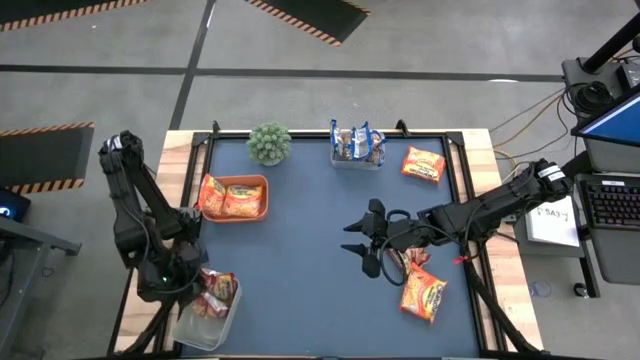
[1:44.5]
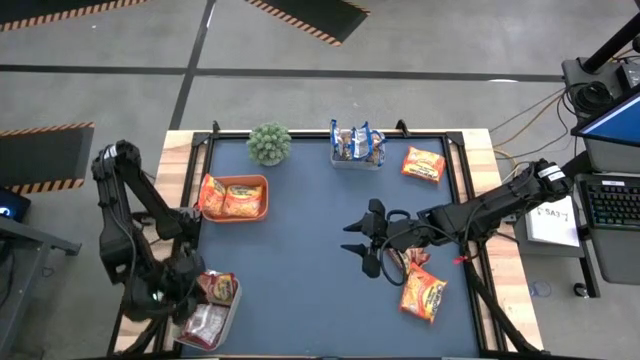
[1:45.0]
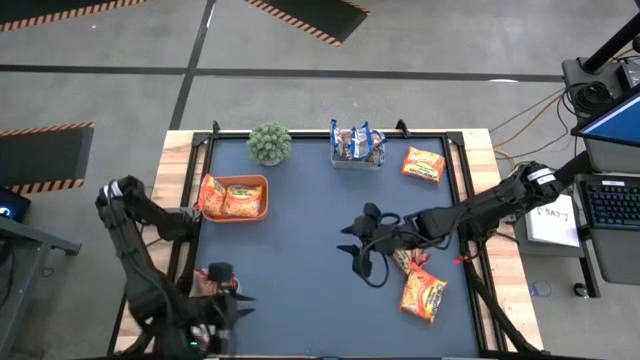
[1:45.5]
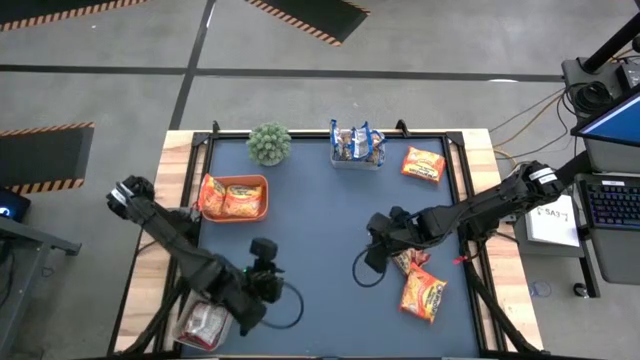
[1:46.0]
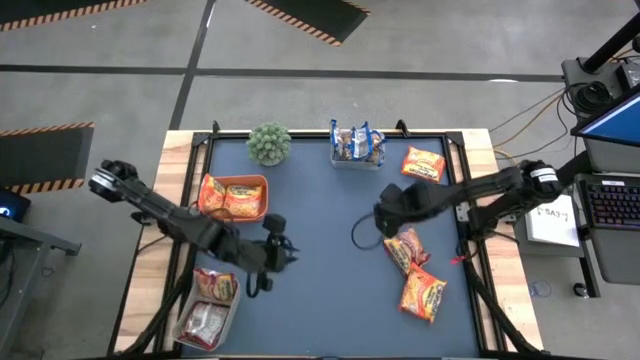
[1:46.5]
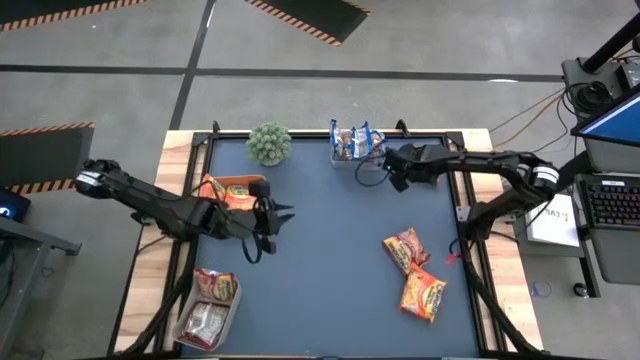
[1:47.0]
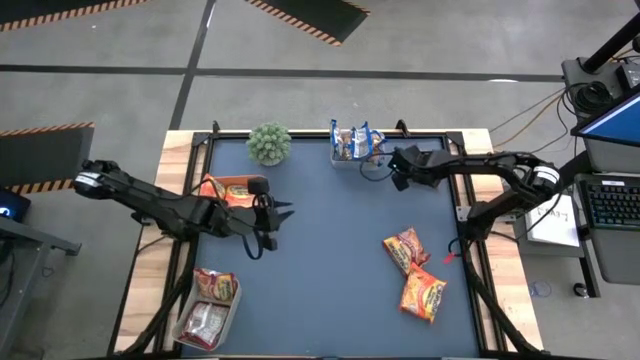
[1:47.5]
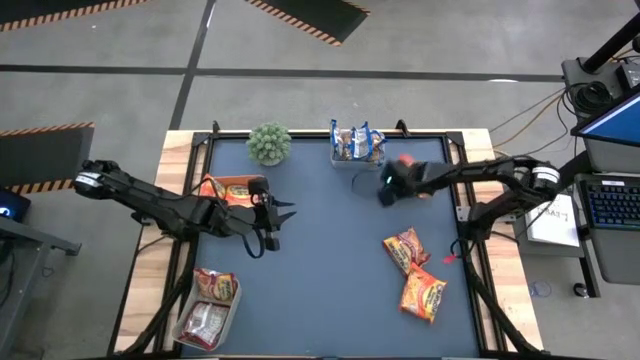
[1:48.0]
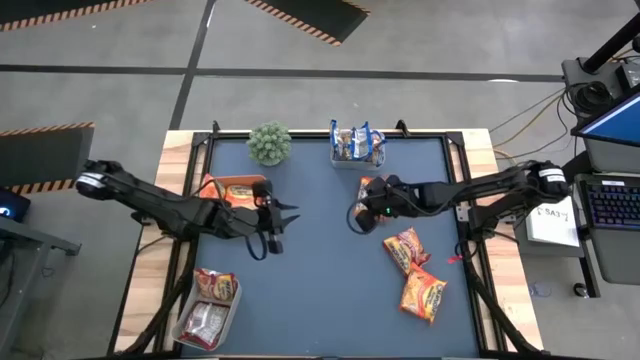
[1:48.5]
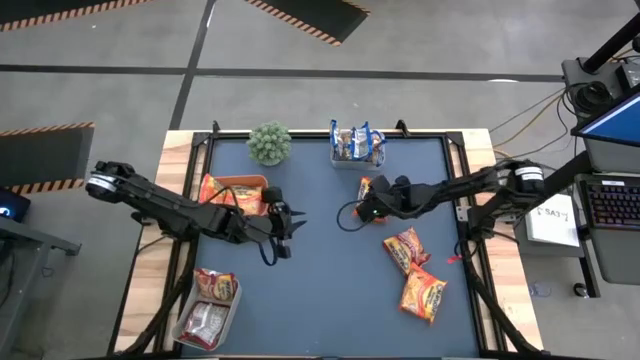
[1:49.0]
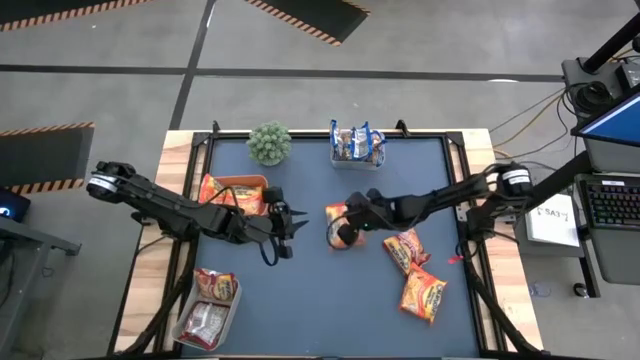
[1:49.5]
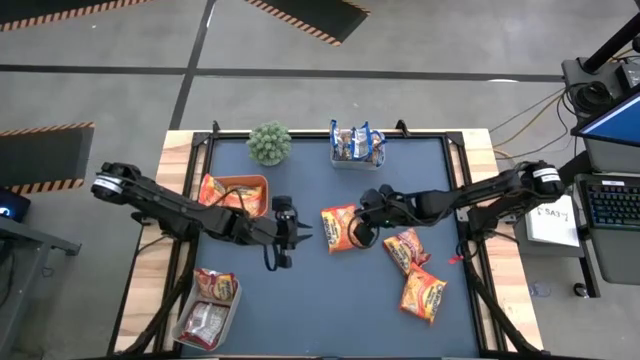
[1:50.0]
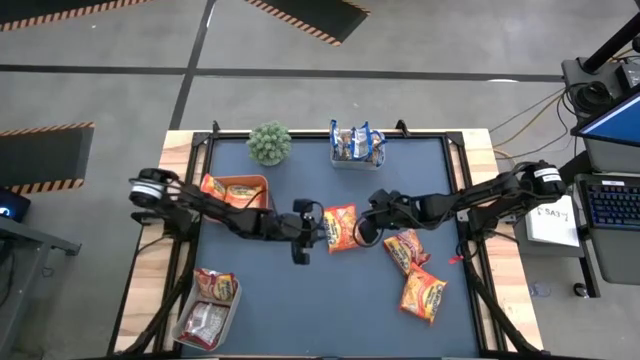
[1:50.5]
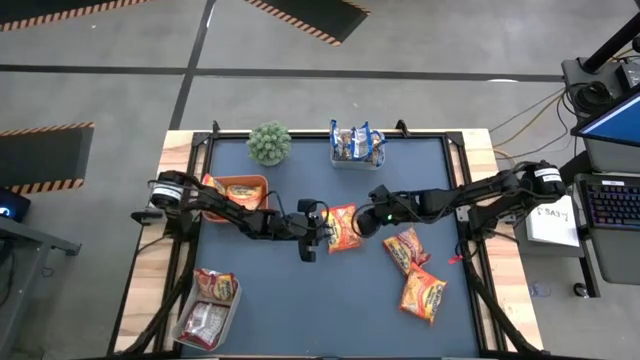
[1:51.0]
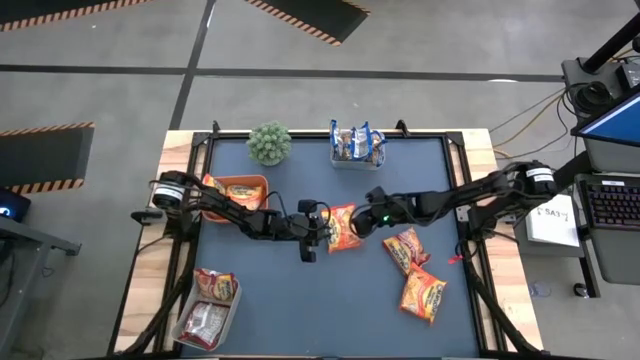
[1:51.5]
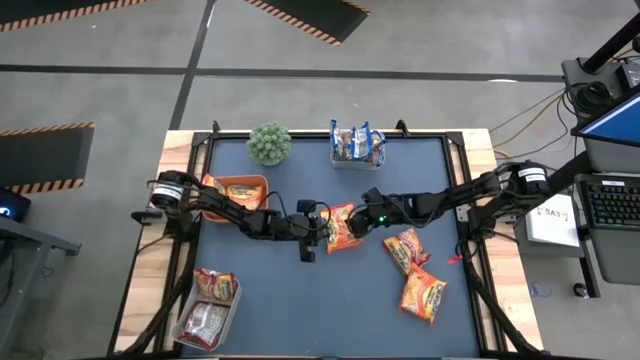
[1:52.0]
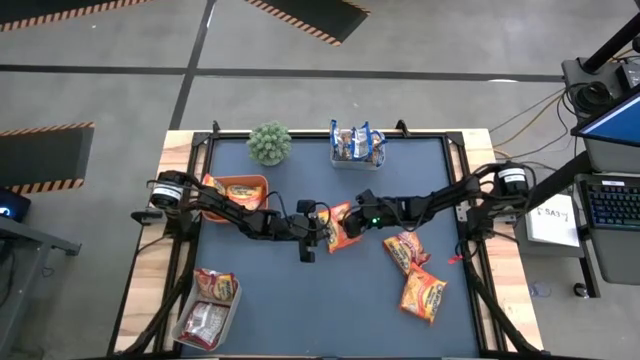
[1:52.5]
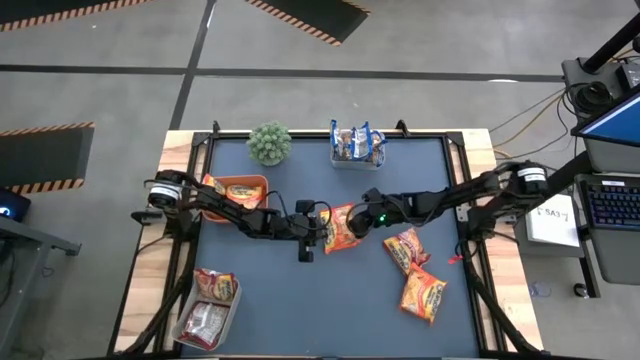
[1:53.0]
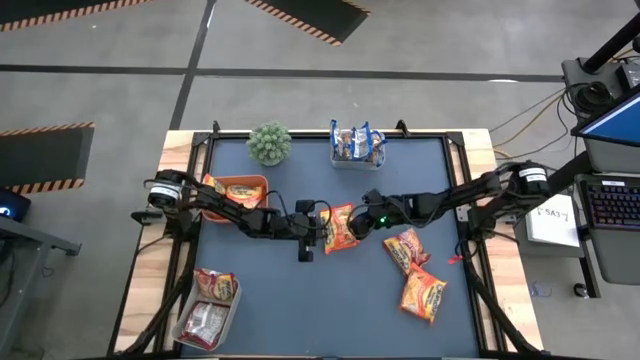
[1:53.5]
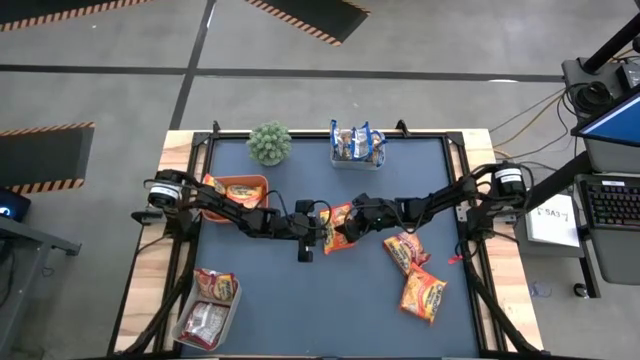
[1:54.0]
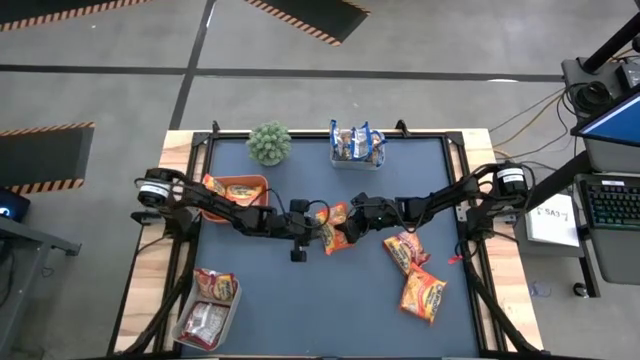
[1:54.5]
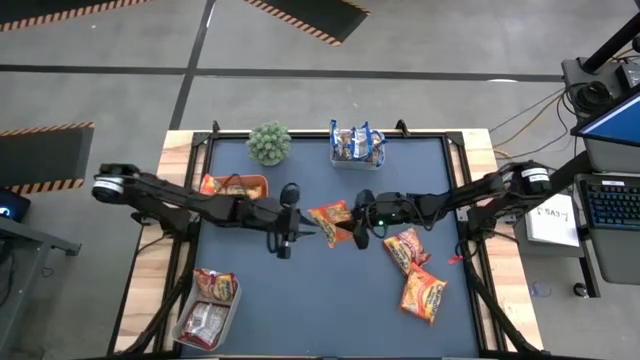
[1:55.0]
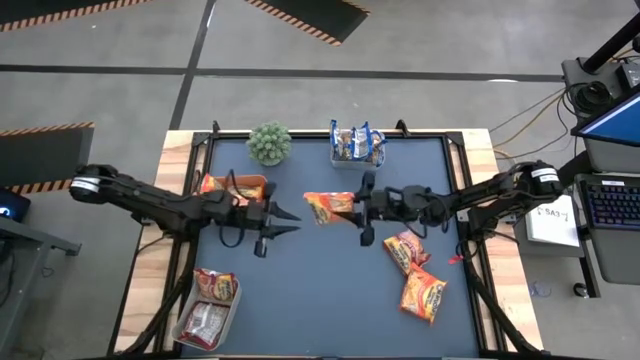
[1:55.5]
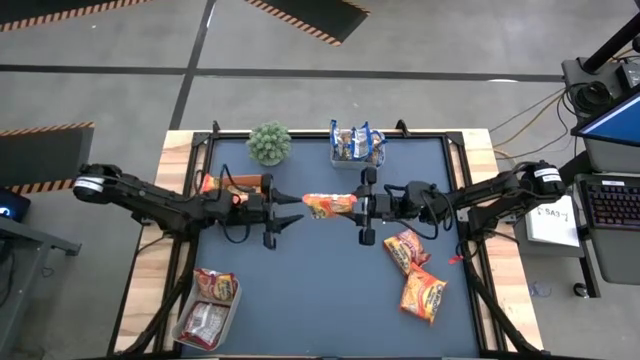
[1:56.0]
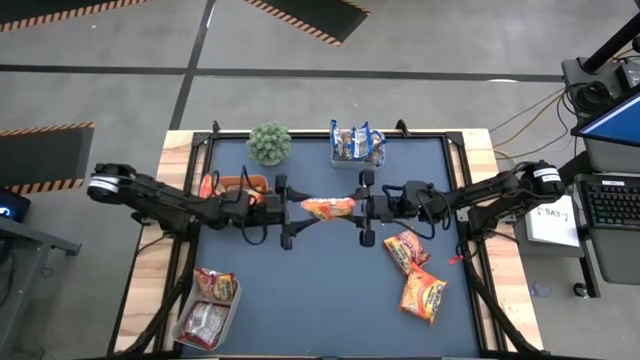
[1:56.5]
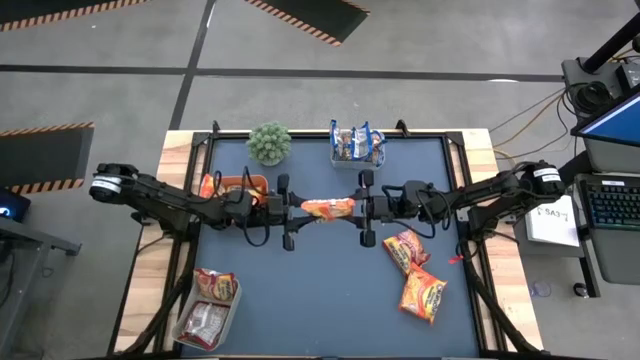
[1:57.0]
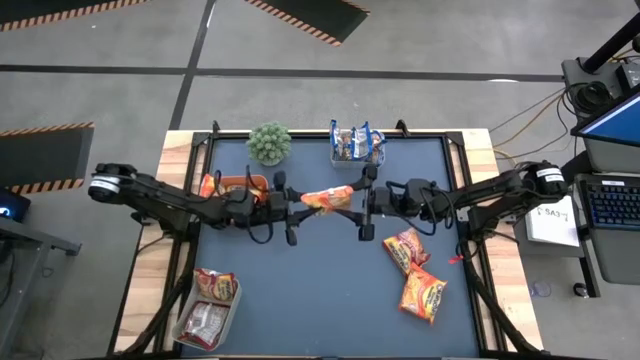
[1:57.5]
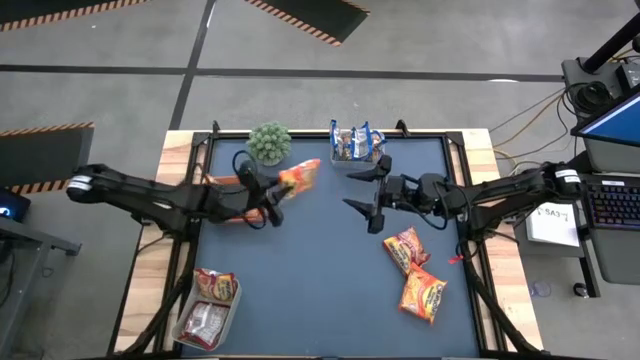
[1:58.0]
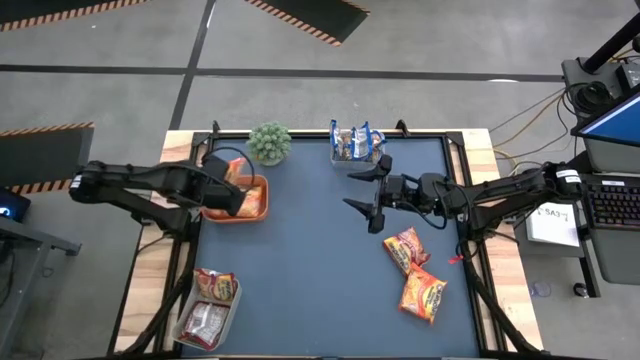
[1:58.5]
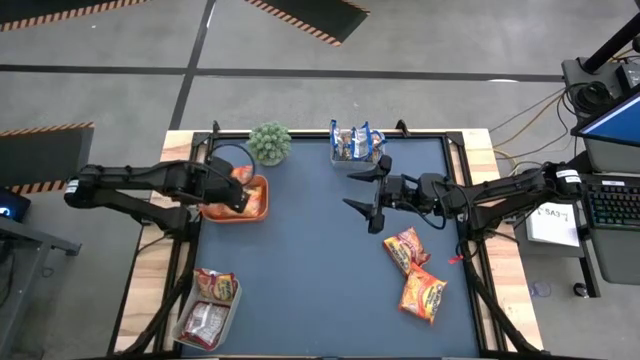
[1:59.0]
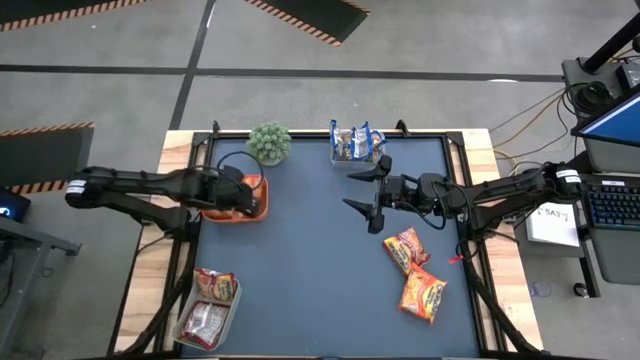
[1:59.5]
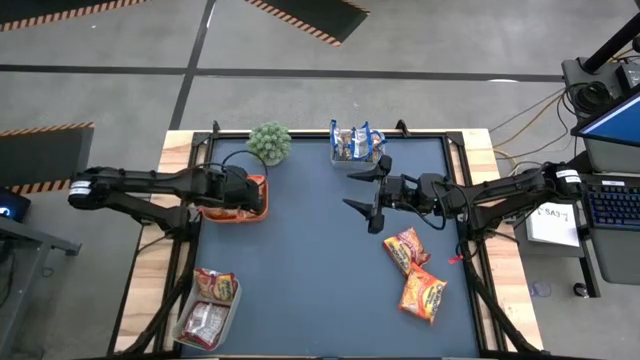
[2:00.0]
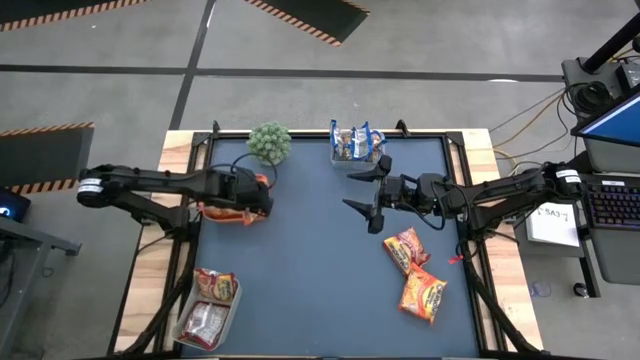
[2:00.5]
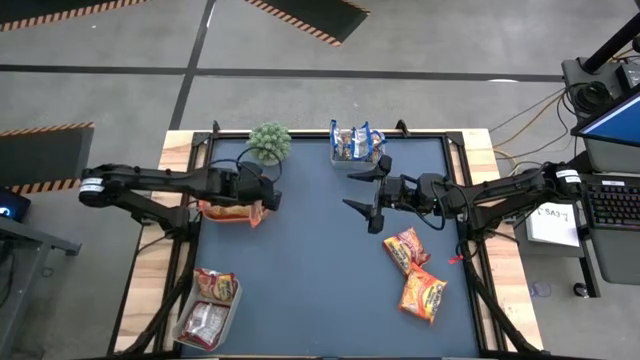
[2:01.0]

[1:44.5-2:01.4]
Task: Sort Maruchan noodles
Put the orange noodle pack into the orange bin

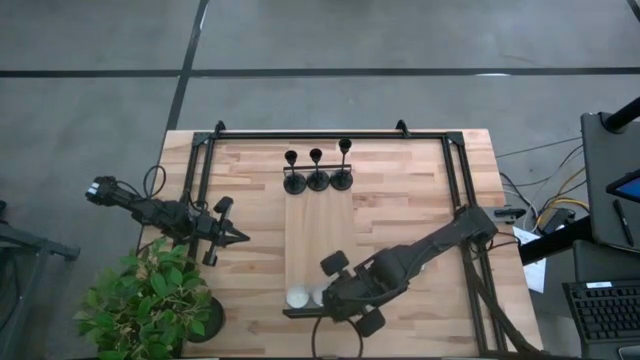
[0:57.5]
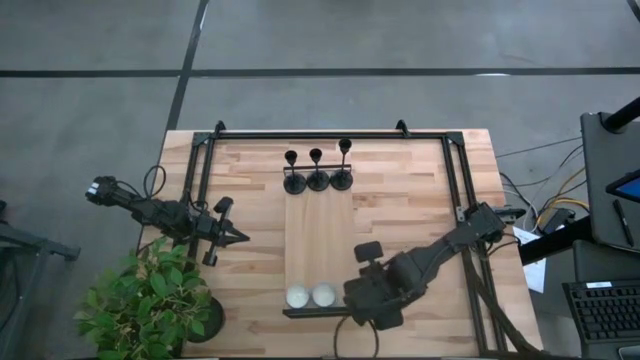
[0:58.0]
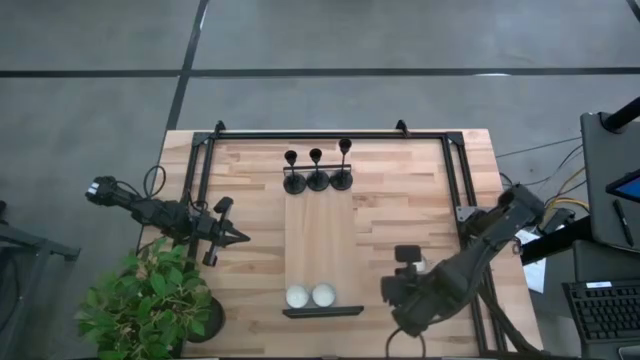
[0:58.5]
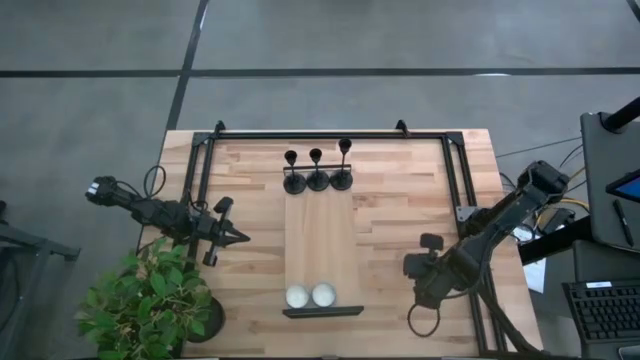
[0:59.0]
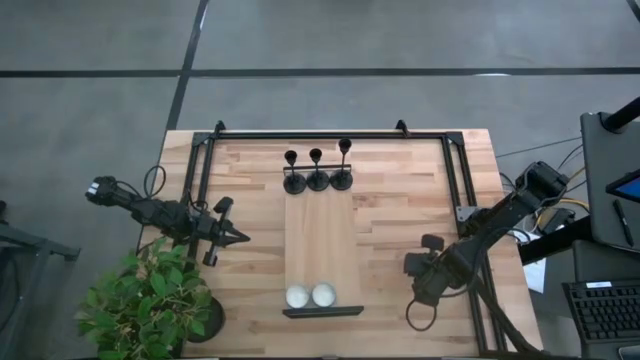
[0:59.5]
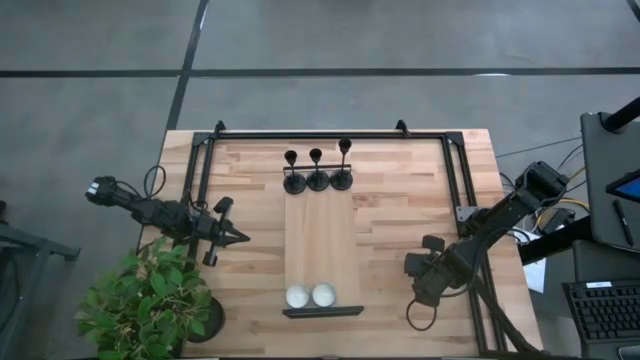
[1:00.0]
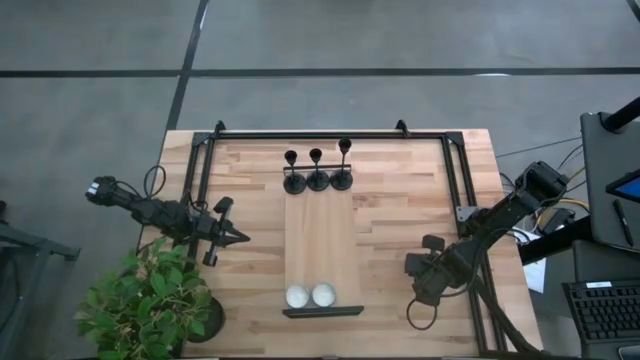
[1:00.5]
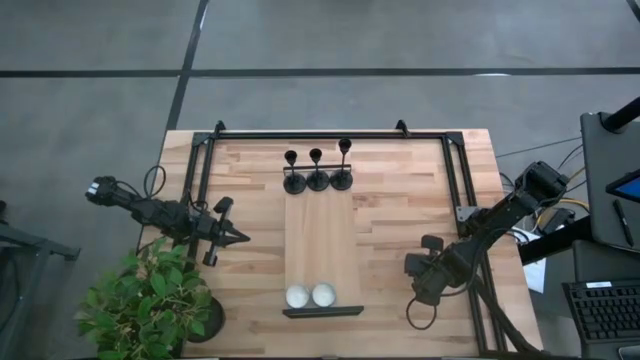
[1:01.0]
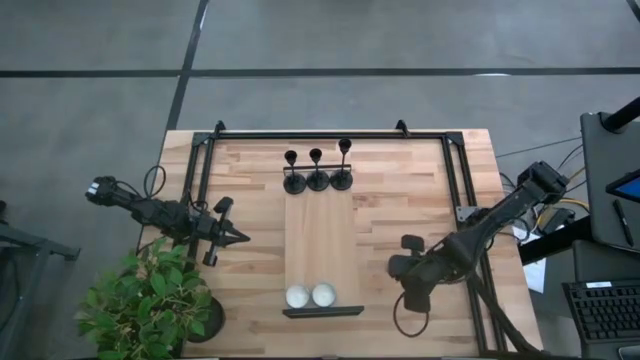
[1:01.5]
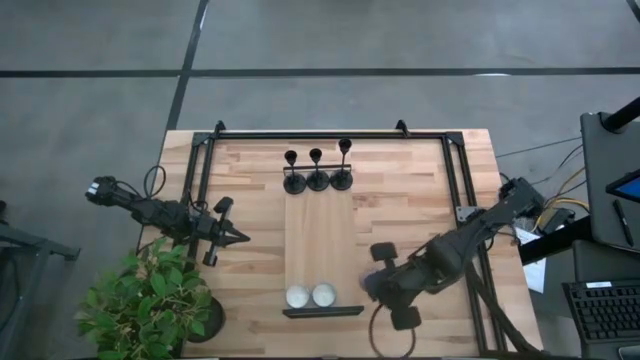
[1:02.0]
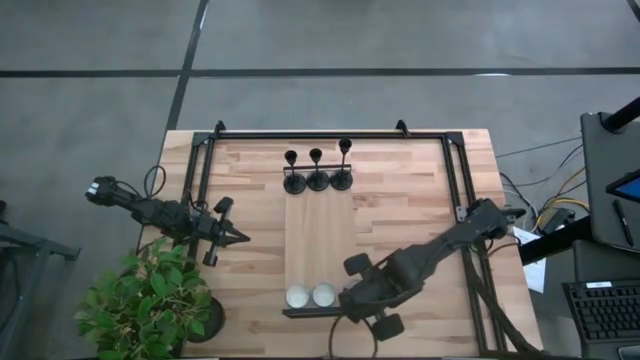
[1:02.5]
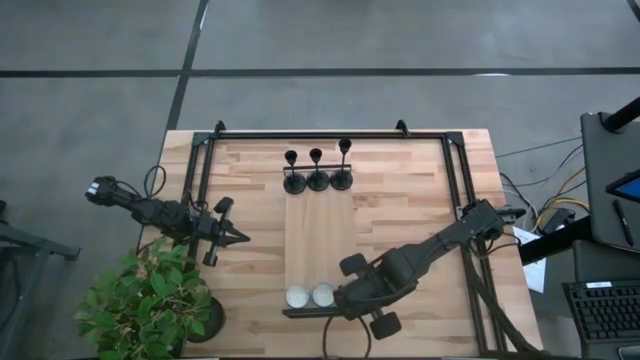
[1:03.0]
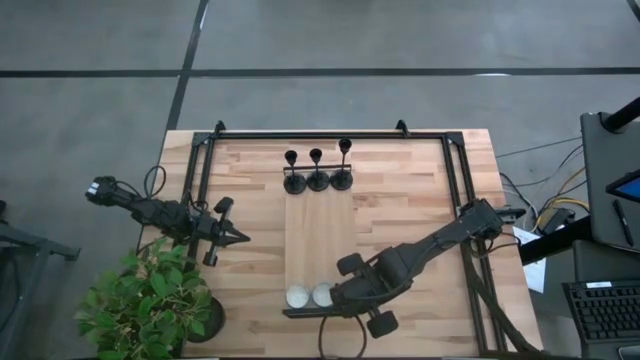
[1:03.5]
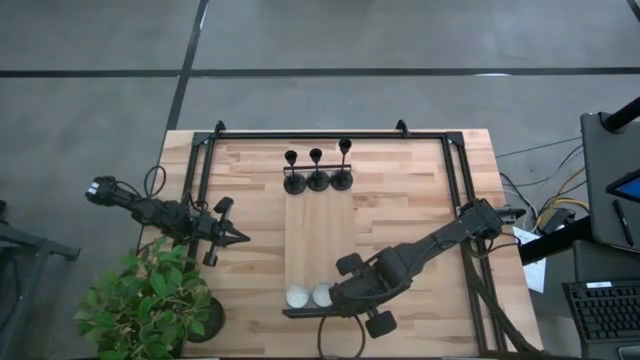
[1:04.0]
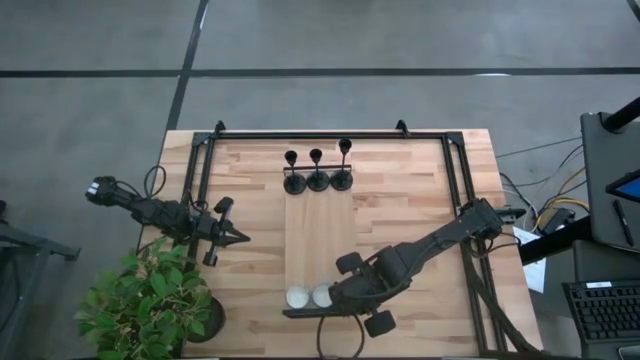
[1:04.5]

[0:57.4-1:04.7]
Task: Pick & Place candle stick holders
Put the pink patterned scented candle on the shelf aligned with the other red and blue patterned scented candles
